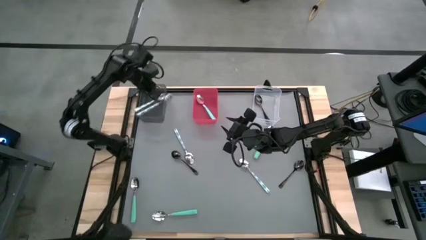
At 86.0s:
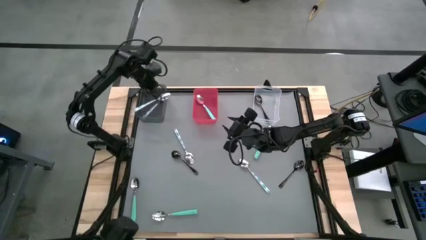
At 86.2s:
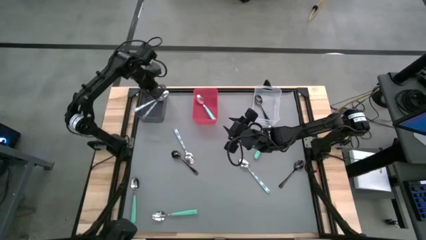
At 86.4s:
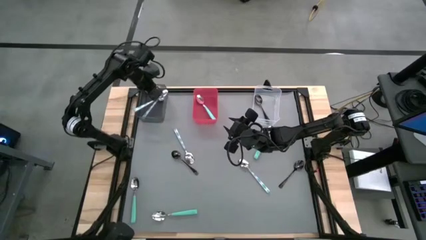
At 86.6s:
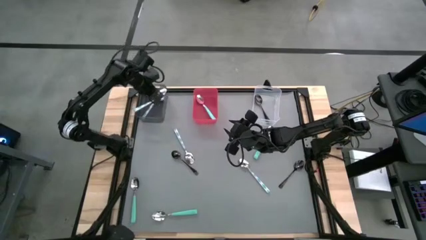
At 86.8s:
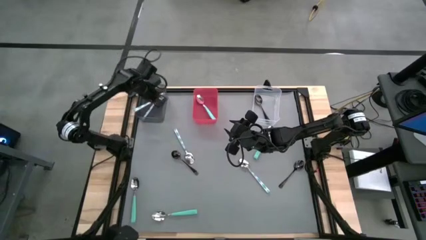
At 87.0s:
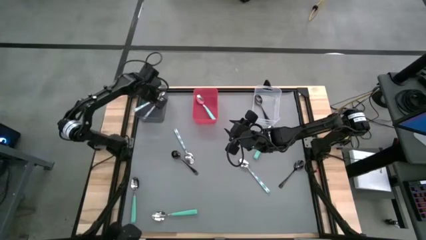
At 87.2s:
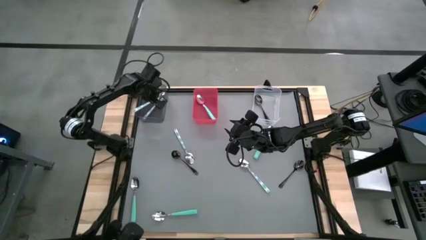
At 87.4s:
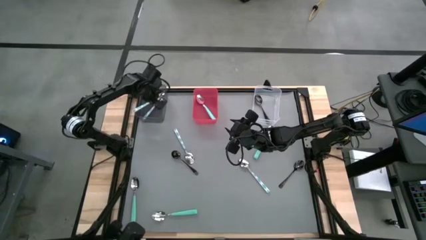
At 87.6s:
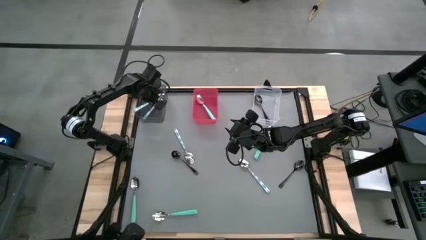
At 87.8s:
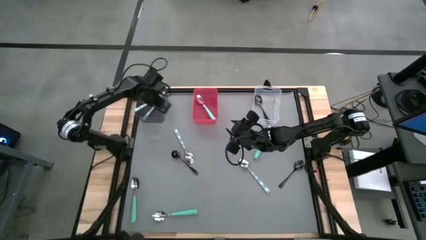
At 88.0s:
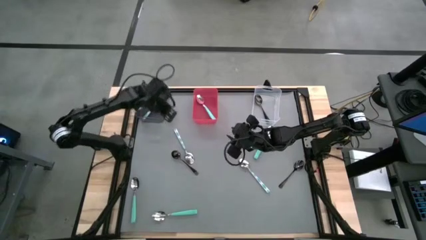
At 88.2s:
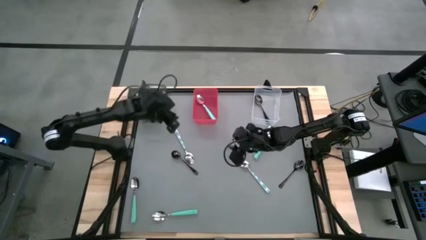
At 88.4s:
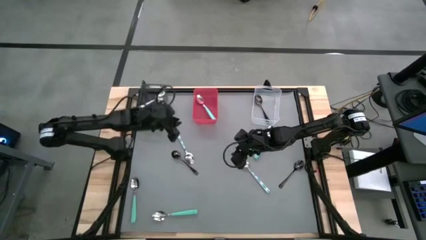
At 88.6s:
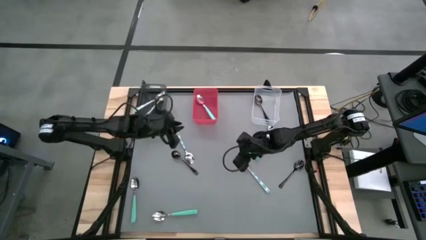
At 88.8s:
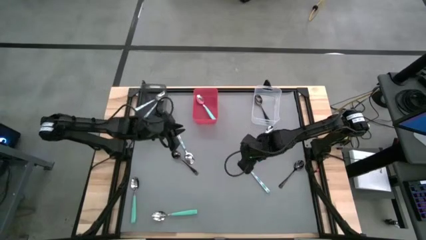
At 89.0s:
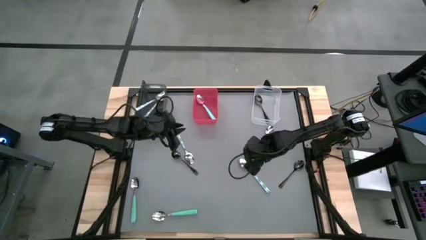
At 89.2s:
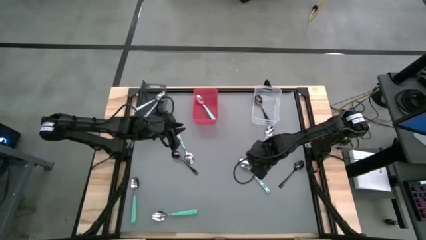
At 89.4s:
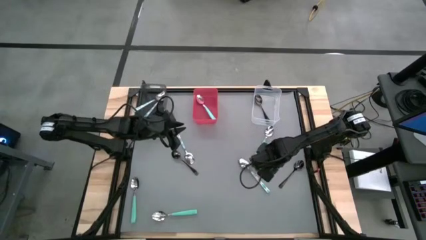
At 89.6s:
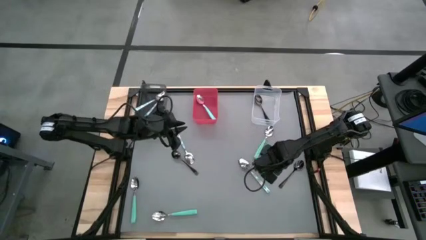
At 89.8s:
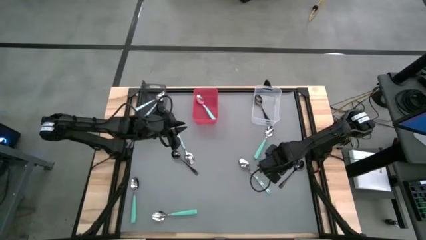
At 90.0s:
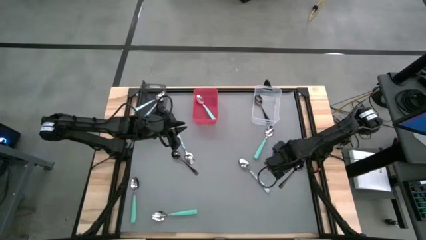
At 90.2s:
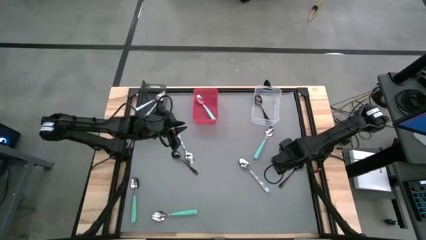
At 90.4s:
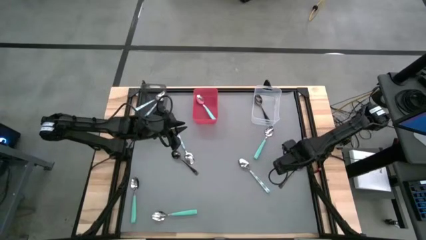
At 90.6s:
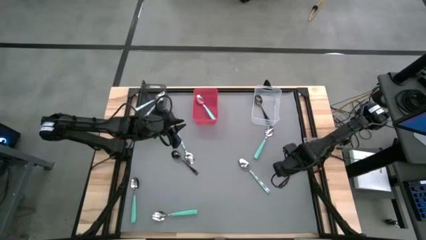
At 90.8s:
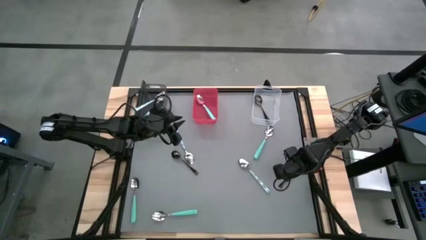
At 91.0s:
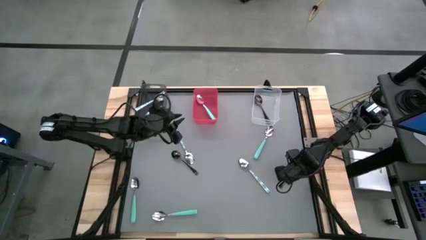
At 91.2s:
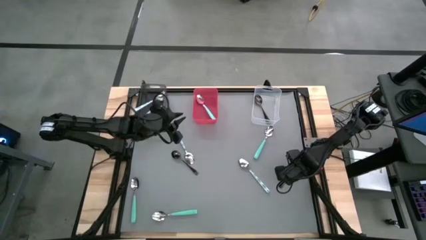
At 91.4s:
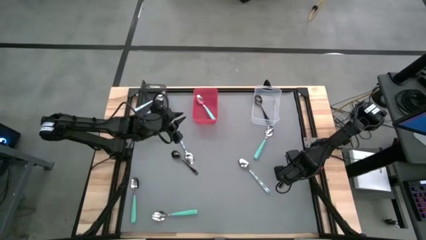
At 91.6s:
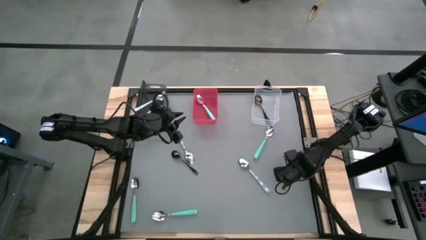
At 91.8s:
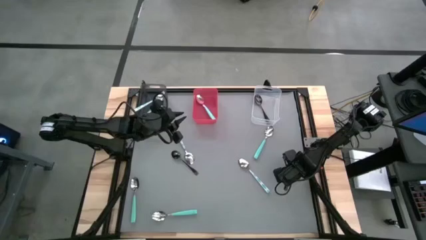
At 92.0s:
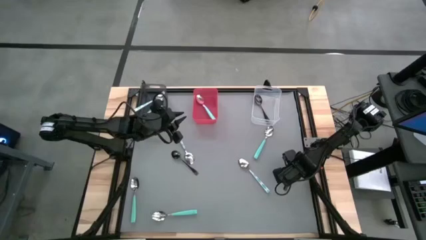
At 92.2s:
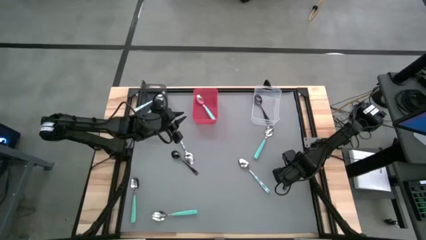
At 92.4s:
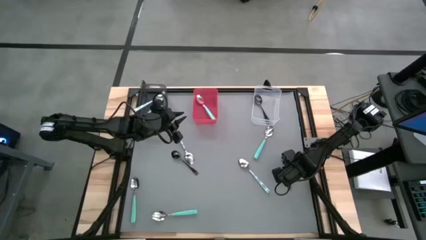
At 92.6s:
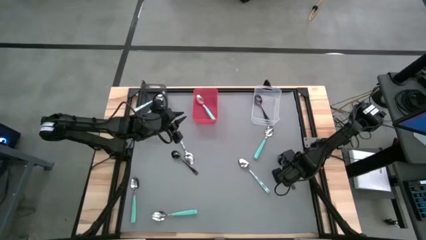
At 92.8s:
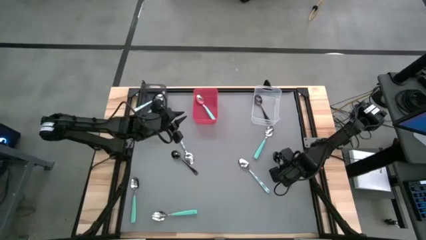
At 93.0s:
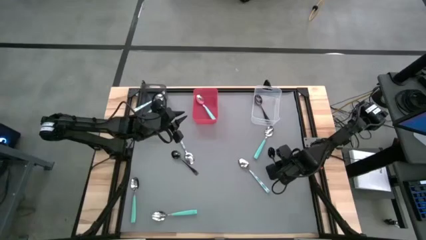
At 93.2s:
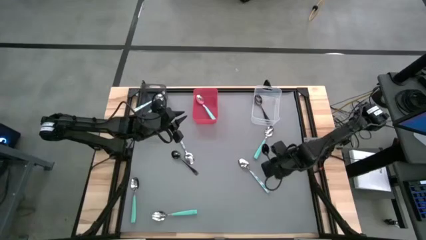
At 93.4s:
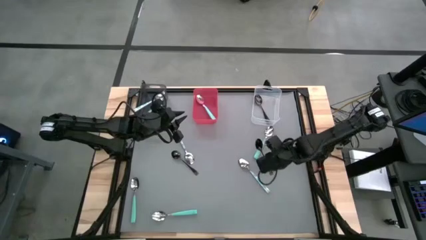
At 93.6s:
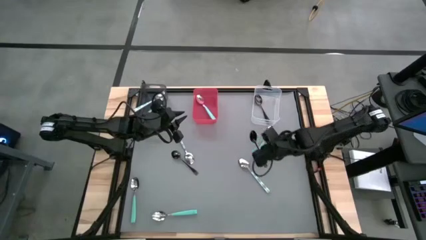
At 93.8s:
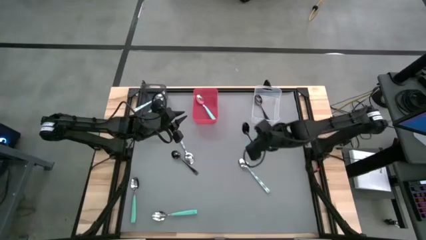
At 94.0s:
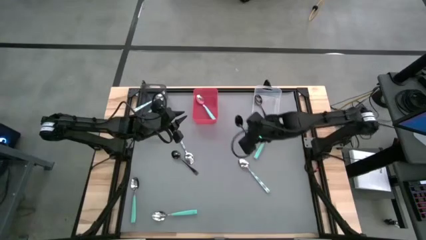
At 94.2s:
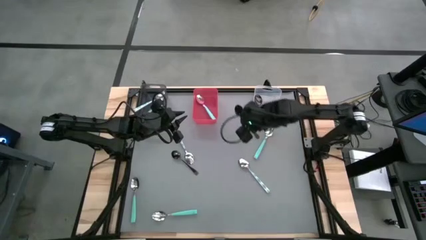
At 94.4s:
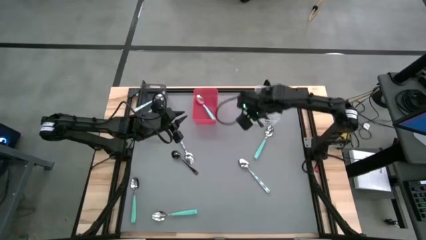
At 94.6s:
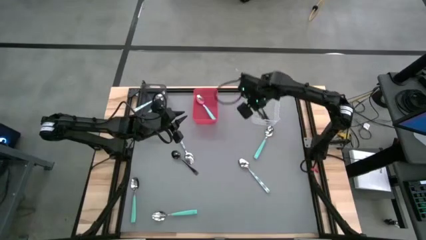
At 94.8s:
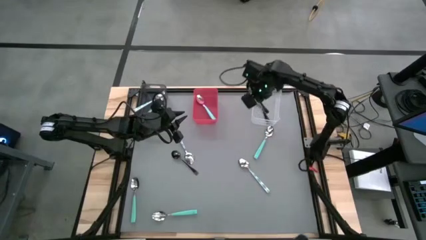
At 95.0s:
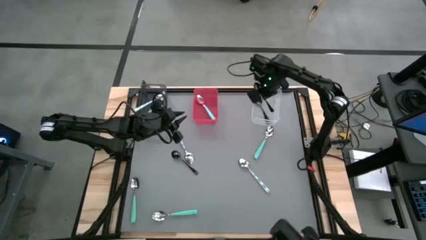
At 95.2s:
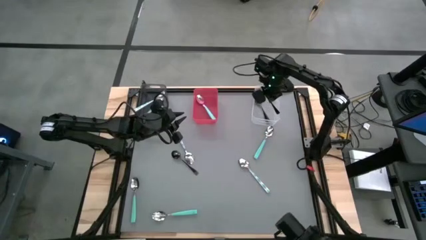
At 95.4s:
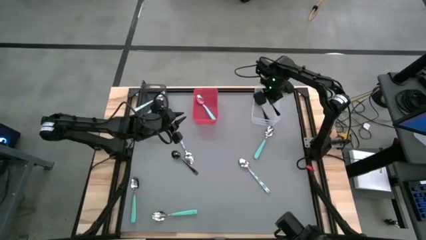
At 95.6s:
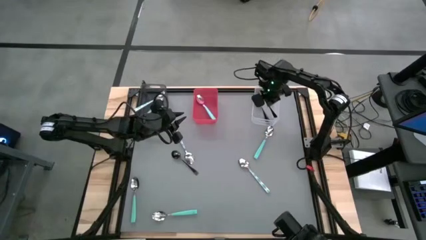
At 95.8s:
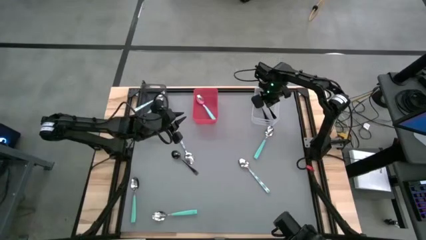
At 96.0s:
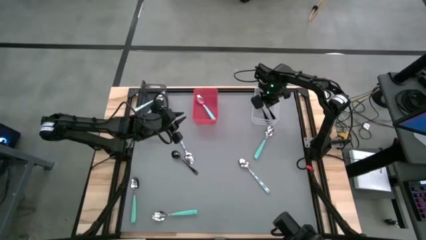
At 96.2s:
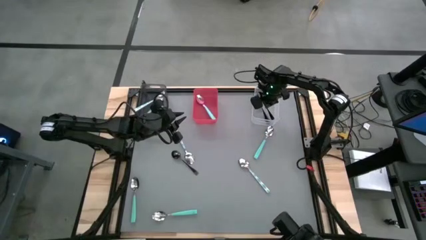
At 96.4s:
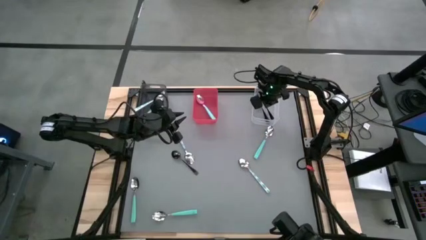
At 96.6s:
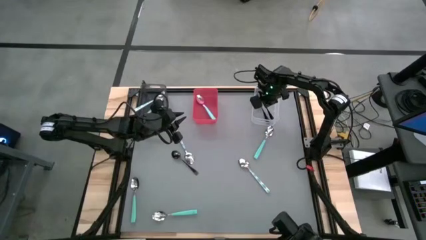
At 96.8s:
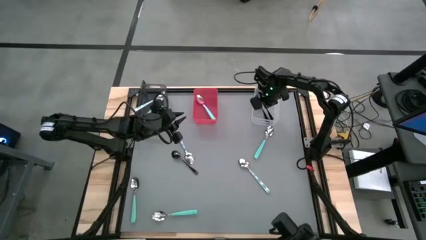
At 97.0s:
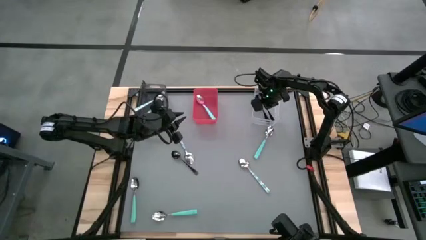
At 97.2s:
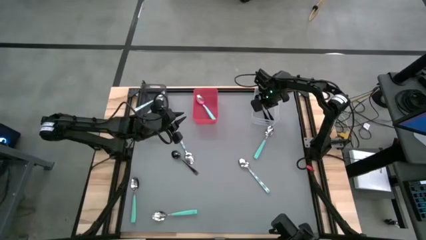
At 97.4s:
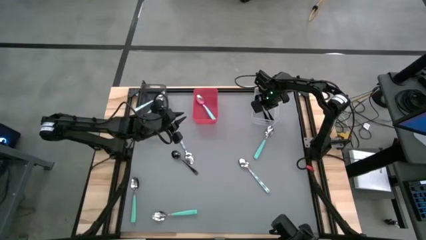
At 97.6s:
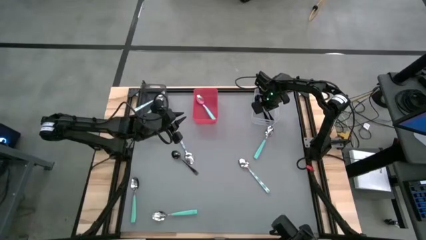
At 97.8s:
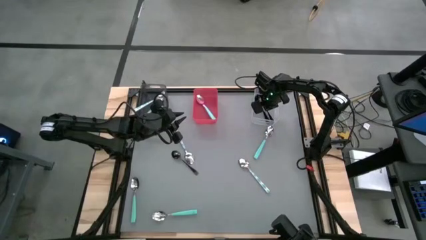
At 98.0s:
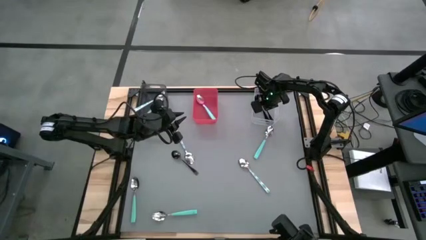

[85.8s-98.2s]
Task: Sort silverware by color (type)
Put the black spoon into the transparent bin

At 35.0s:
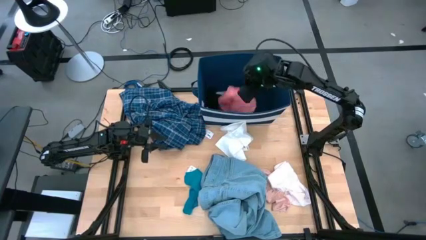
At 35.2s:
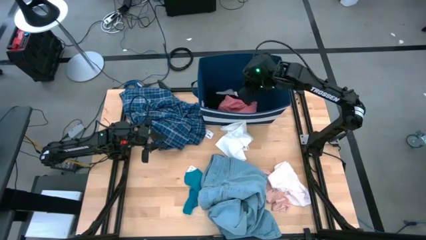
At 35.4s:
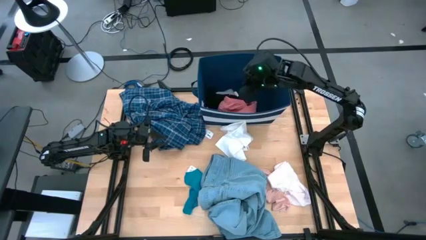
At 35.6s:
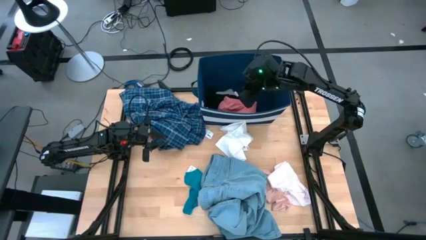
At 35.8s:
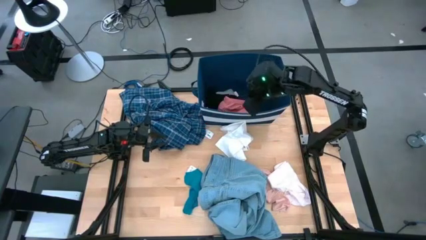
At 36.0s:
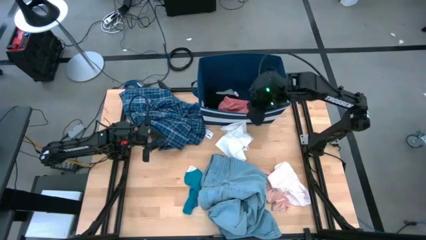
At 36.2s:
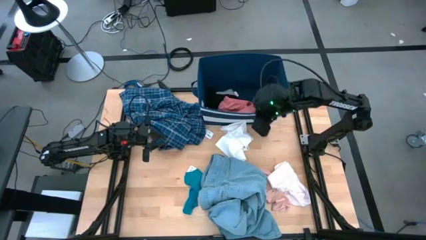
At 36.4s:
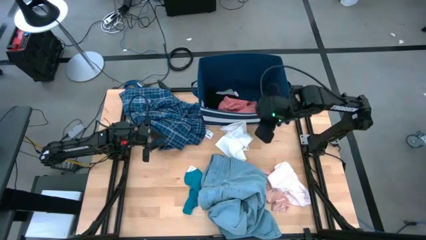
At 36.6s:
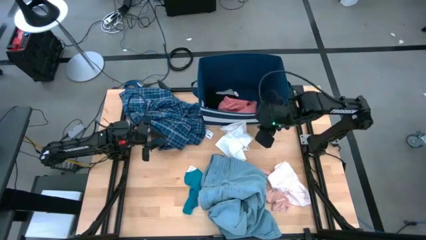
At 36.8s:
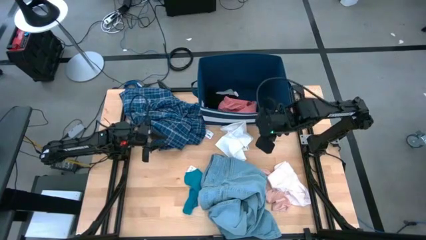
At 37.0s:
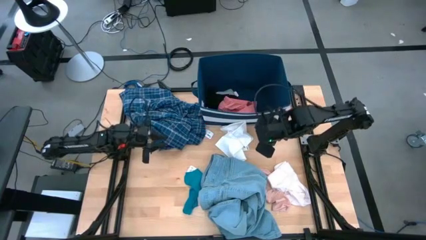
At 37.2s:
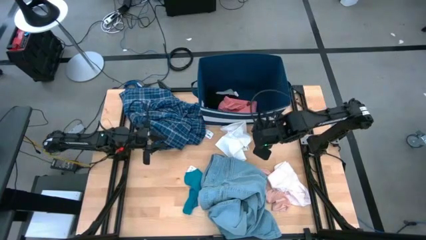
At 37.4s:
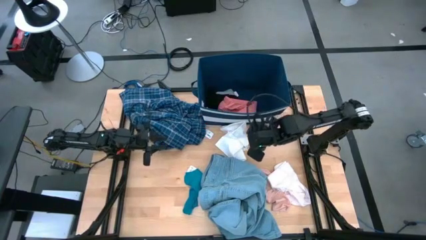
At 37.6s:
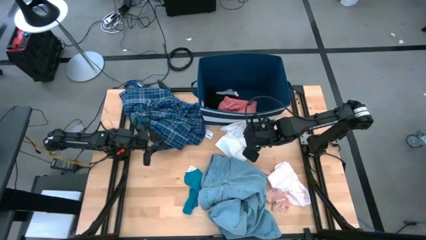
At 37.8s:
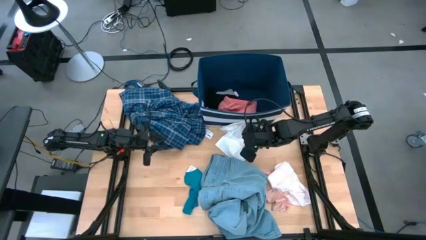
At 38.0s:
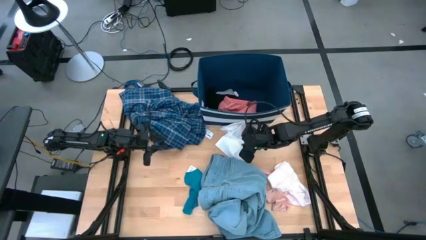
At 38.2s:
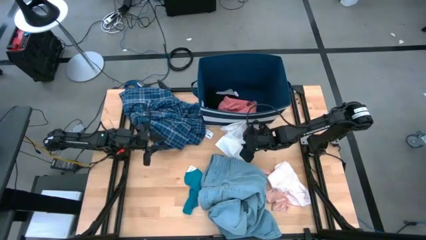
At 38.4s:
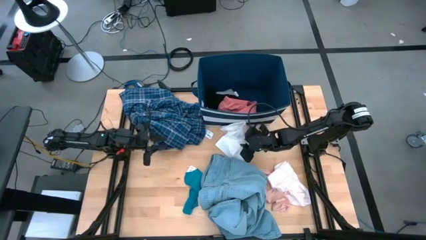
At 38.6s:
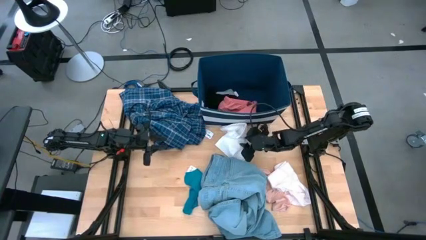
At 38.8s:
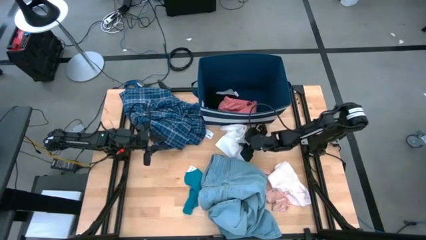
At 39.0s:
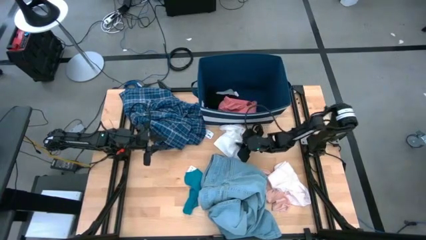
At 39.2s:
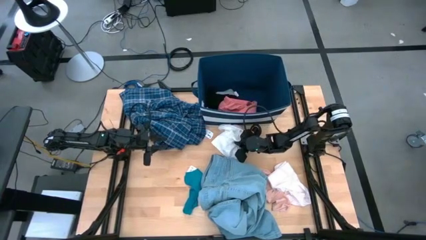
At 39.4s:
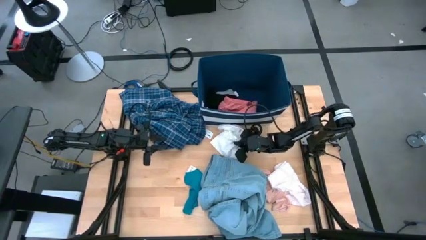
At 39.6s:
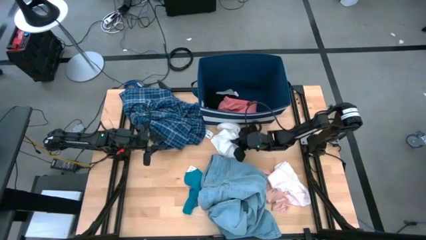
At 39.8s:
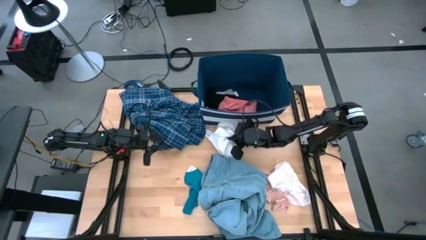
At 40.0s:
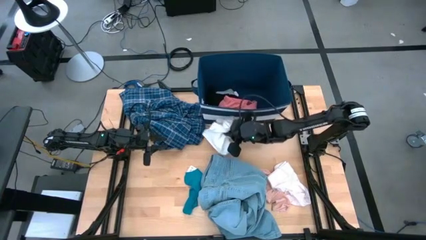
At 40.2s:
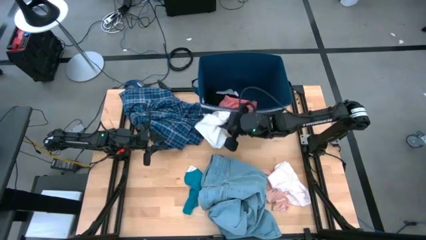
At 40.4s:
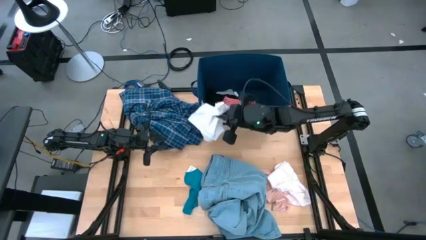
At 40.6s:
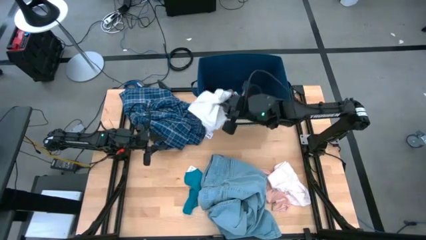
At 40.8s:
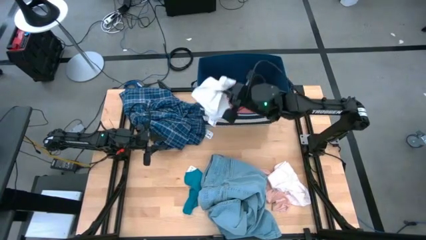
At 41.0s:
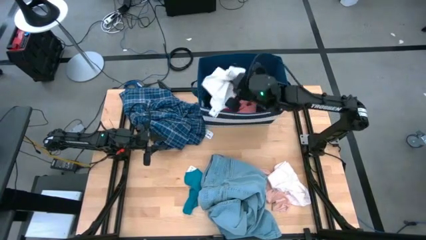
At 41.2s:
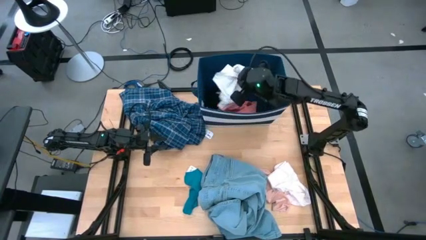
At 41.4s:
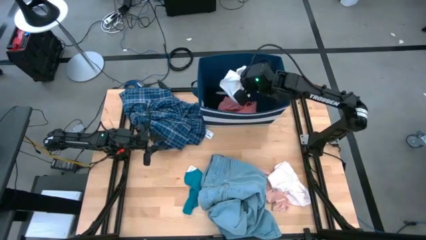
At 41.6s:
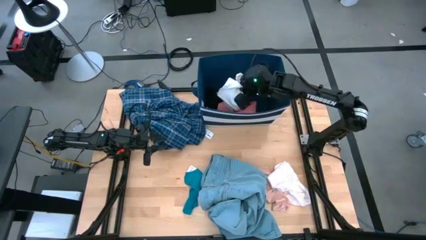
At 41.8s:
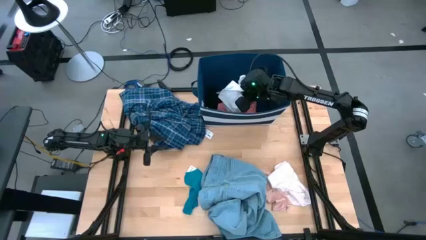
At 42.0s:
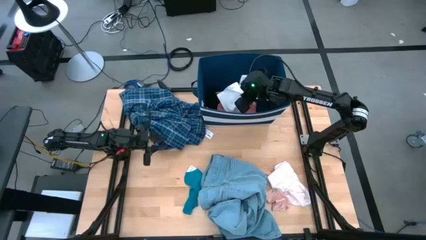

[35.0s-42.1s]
Task: Sort clothes
Put the white underwear into the blue laundry bin
